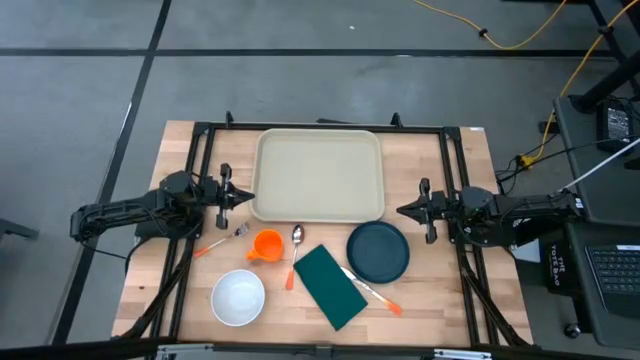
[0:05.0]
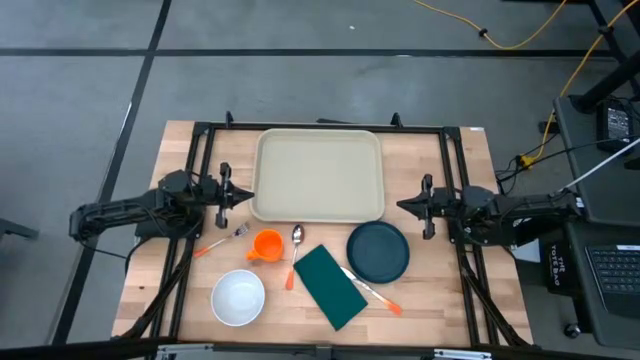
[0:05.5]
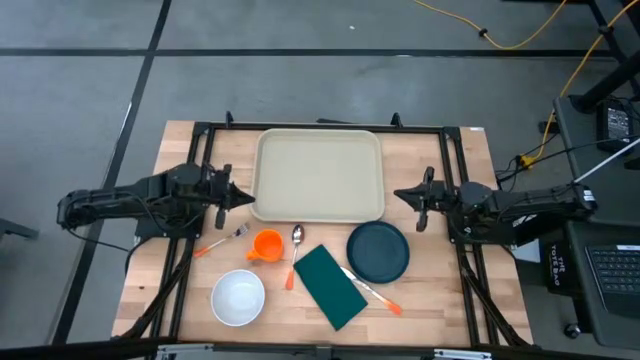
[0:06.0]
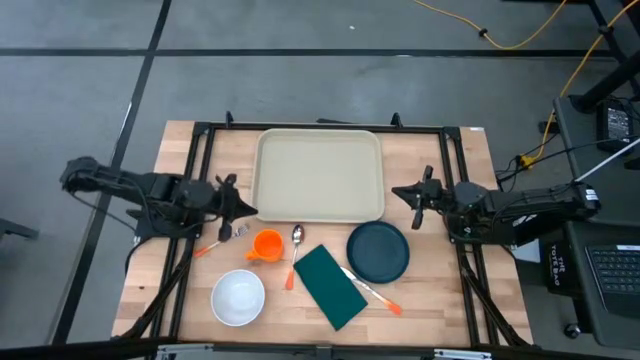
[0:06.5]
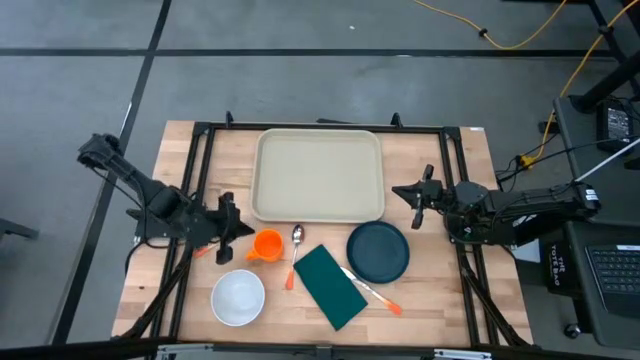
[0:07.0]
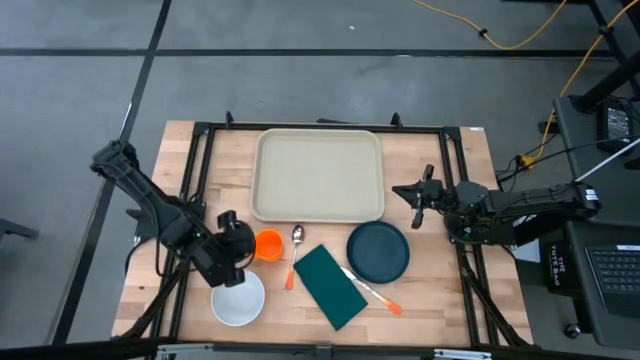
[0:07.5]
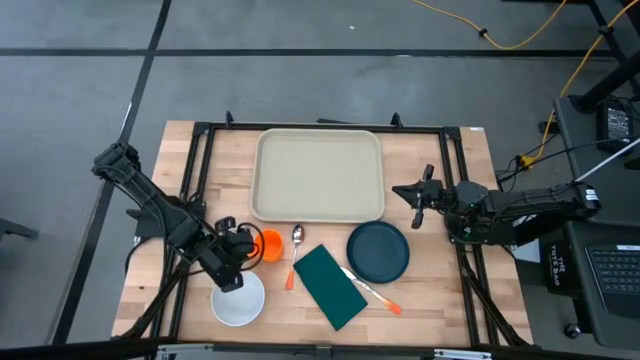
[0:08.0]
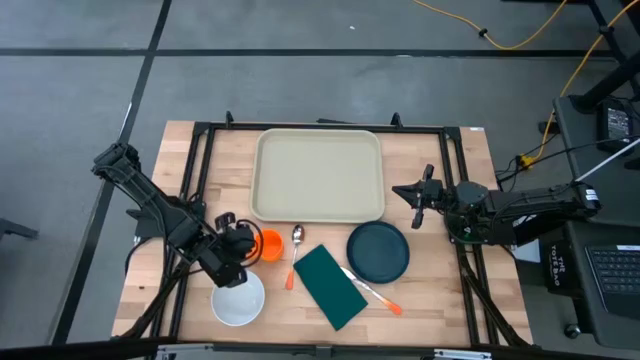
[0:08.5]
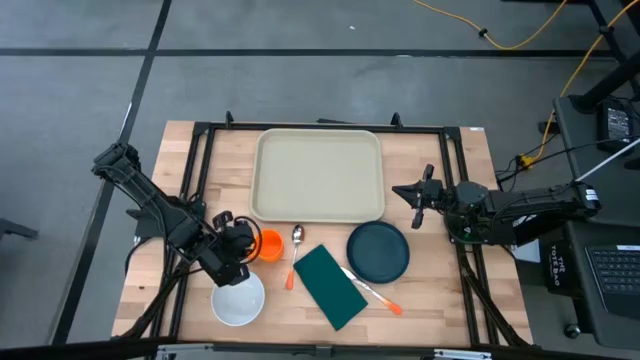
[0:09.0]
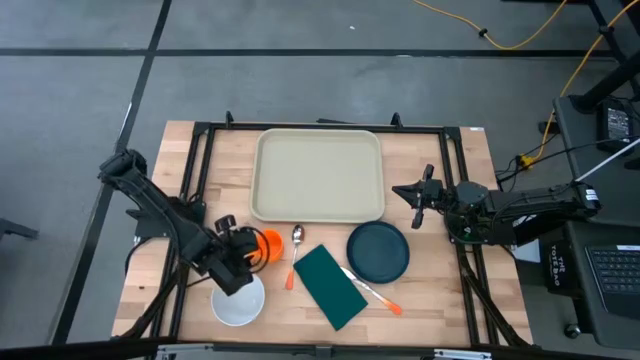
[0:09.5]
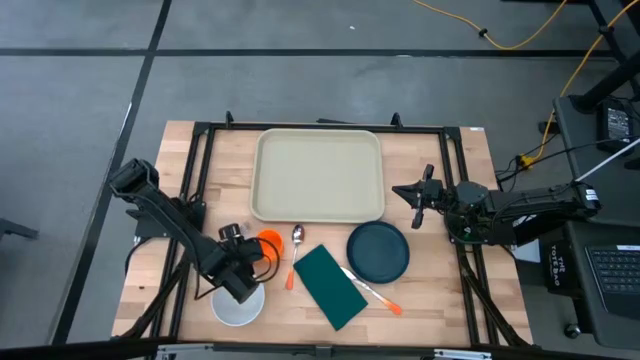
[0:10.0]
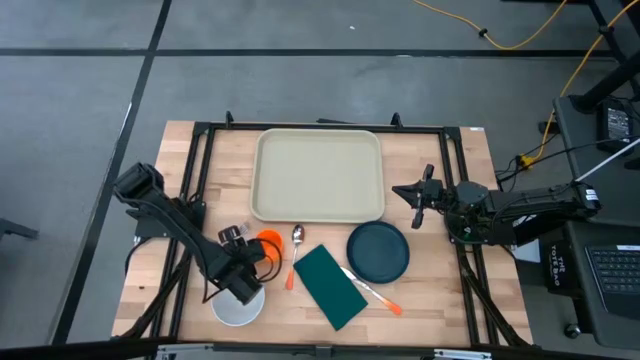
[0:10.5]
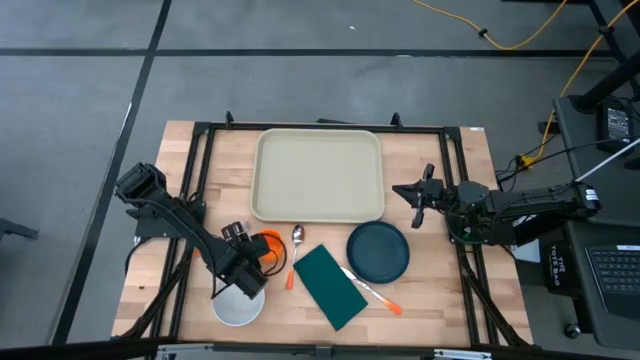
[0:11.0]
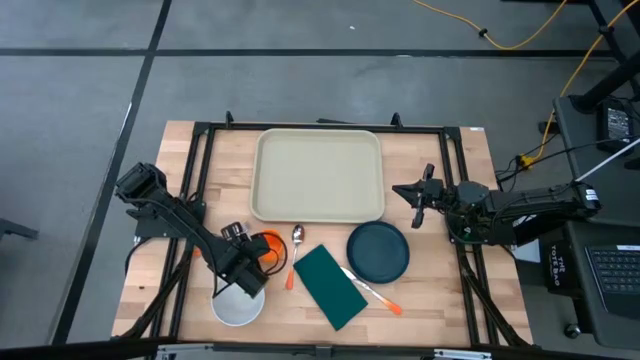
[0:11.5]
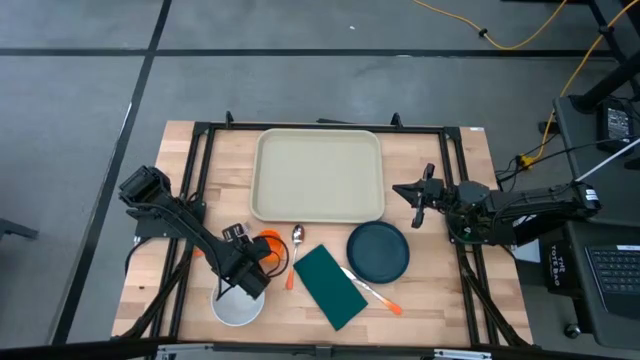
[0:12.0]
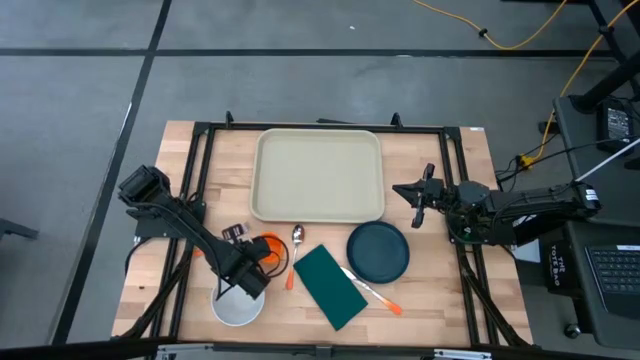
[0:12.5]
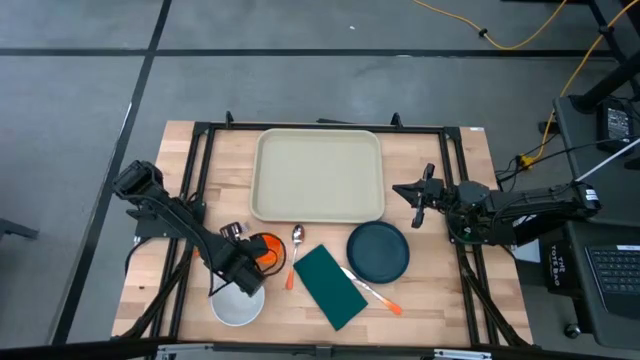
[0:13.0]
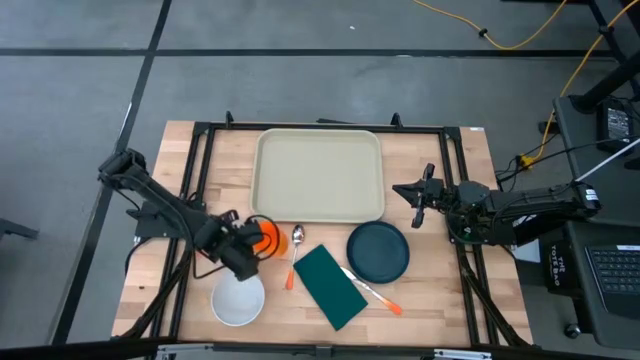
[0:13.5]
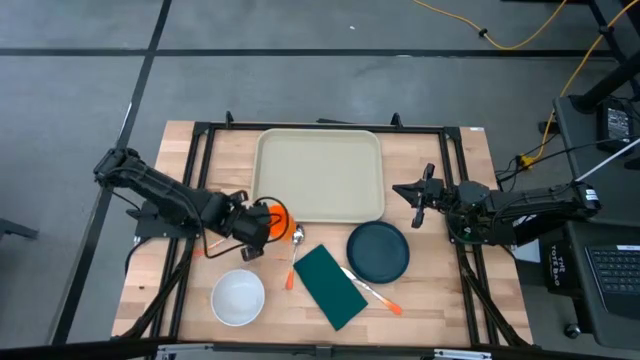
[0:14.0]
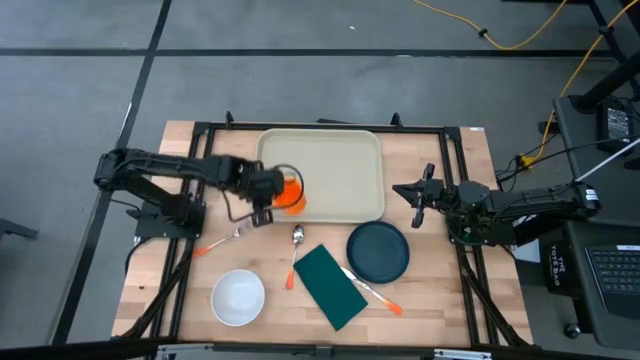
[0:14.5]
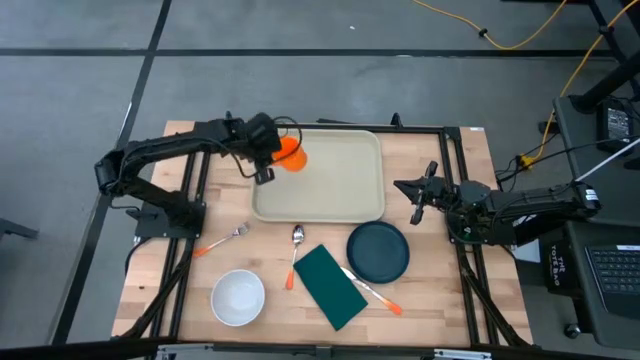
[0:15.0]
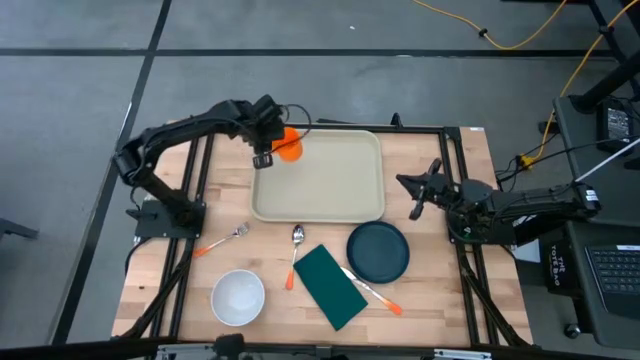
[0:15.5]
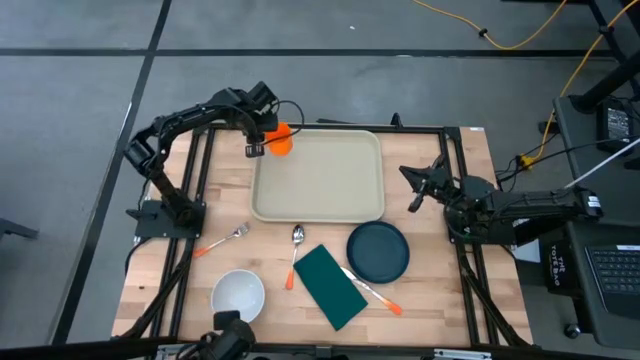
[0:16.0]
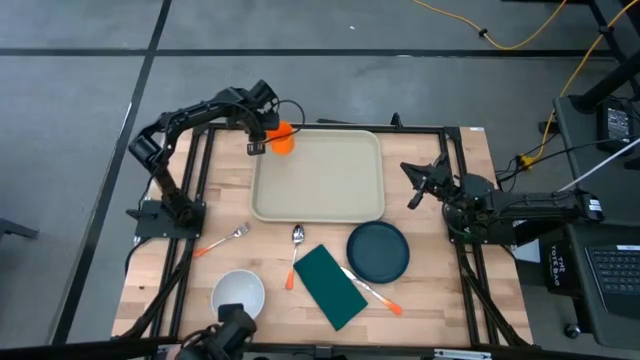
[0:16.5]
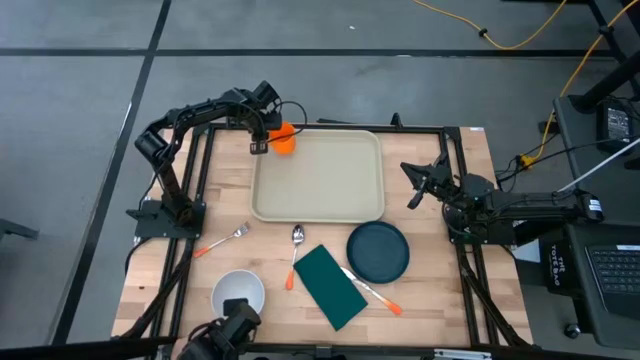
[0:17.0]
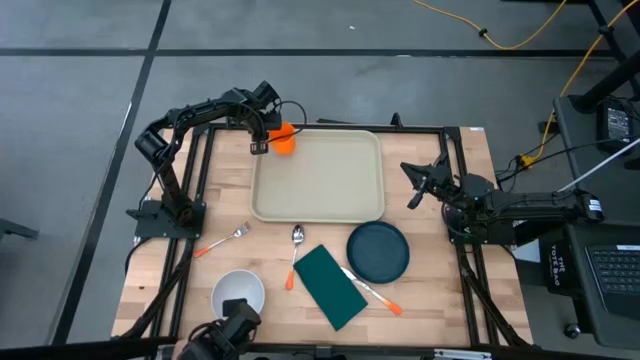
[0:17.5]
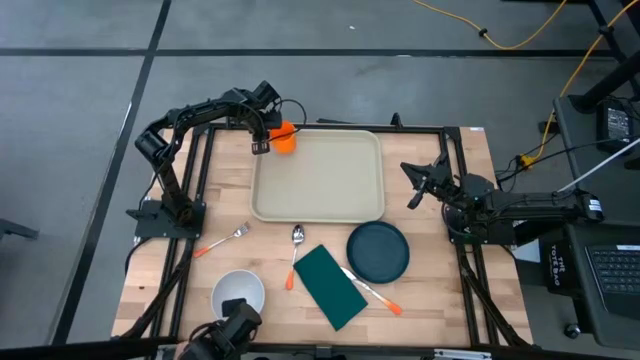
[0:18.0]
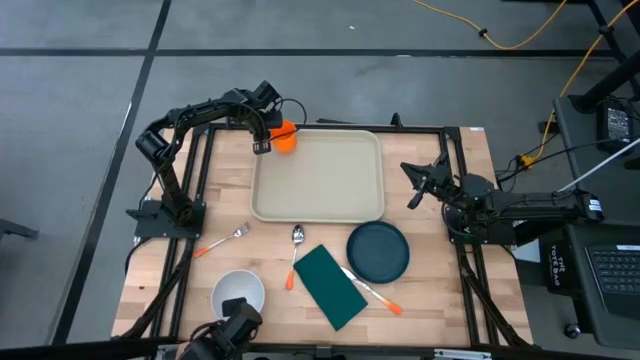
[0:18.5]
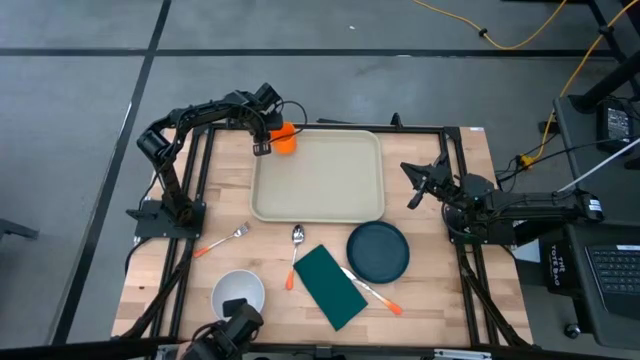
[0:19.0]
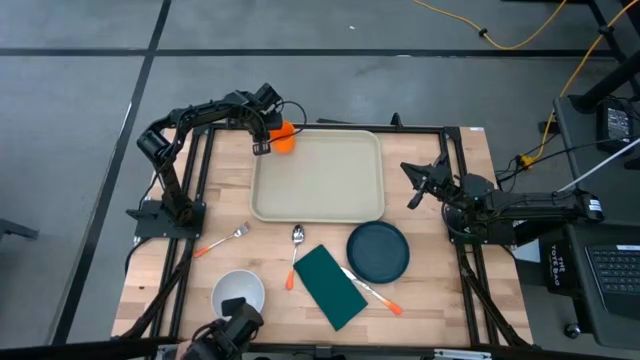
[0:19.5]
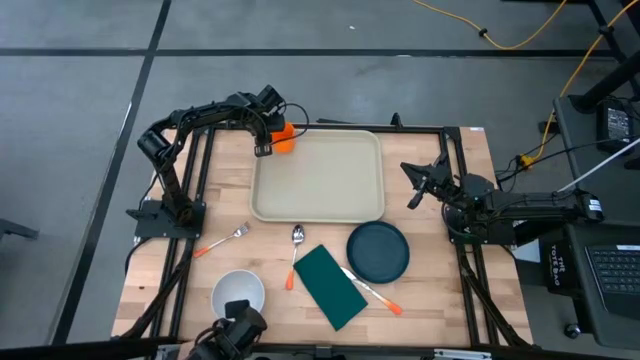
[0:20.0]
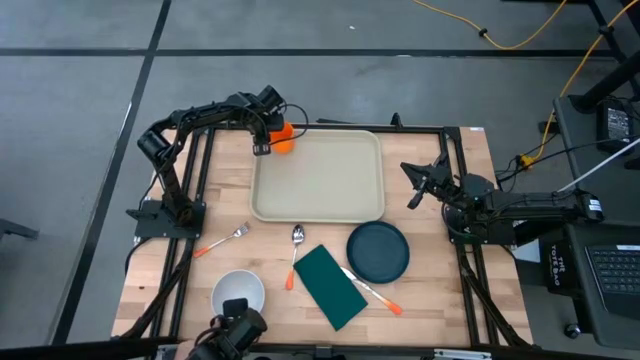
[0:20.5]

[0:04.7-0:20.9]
Task: Set up tray
Put the orange mug on the brown serving tray

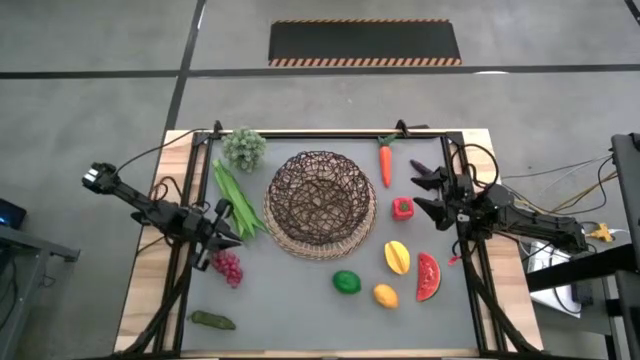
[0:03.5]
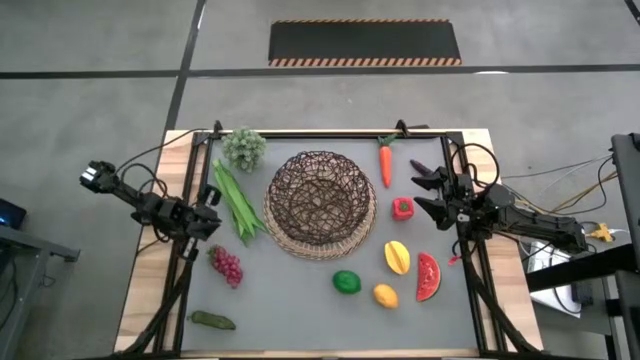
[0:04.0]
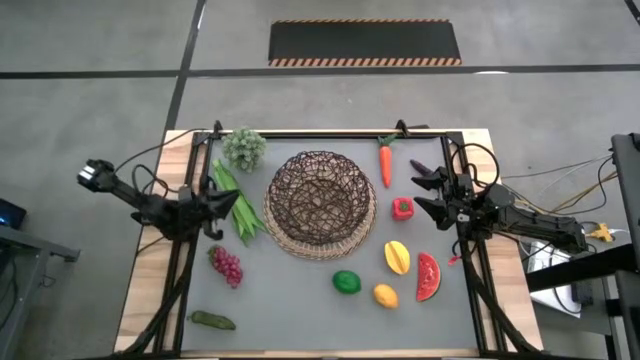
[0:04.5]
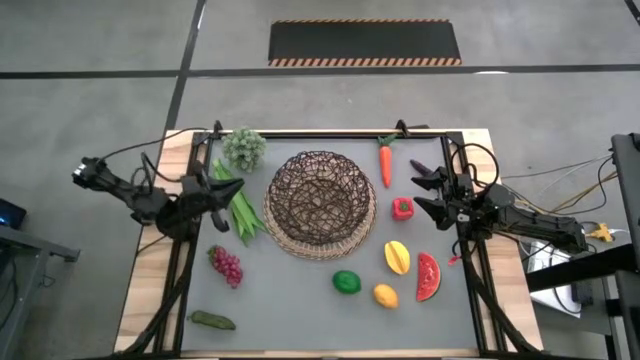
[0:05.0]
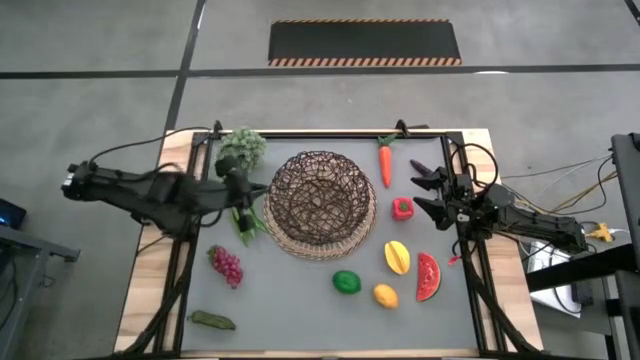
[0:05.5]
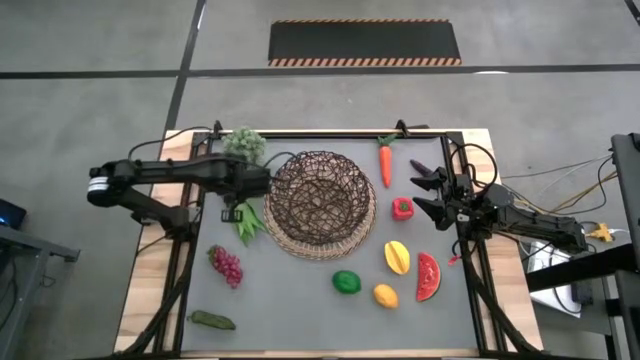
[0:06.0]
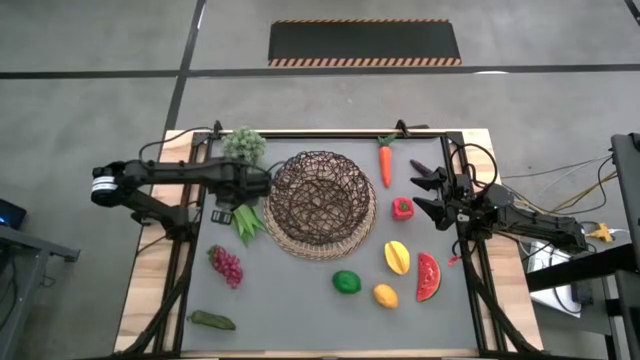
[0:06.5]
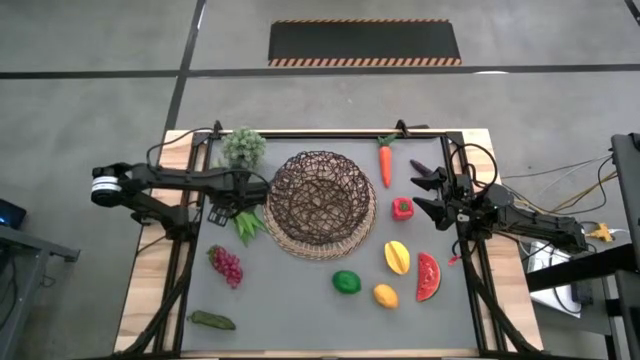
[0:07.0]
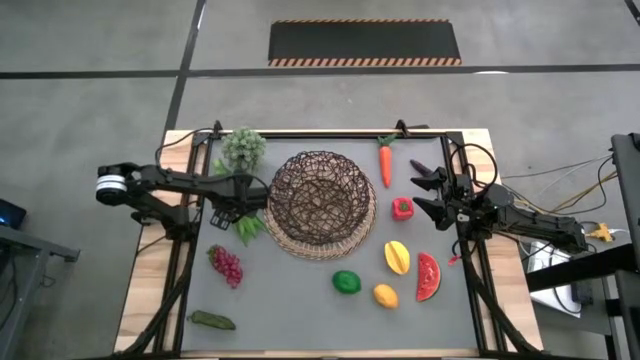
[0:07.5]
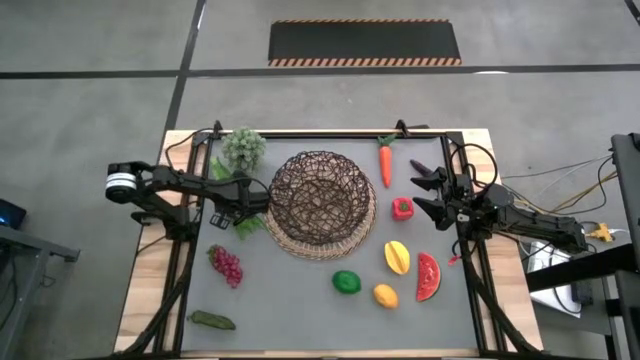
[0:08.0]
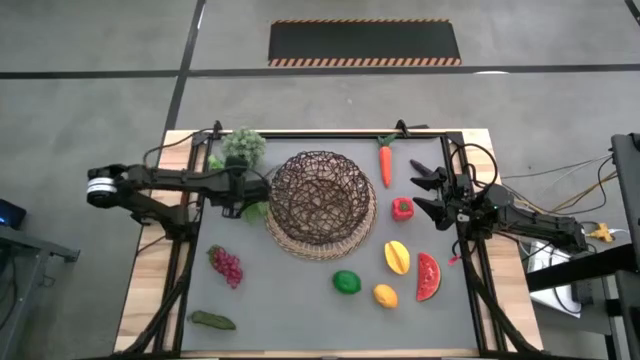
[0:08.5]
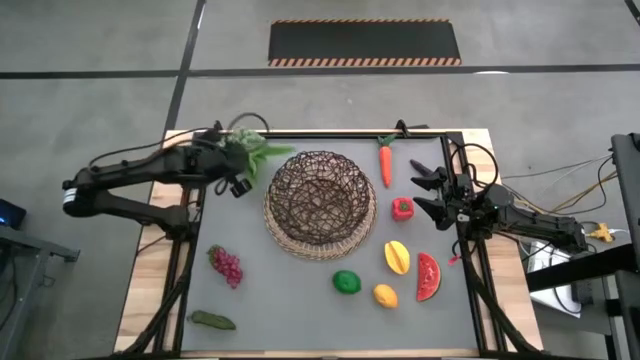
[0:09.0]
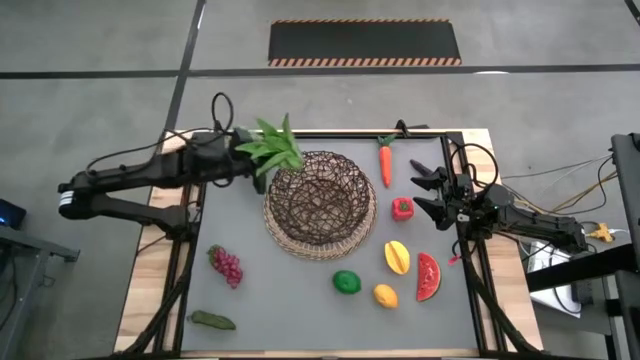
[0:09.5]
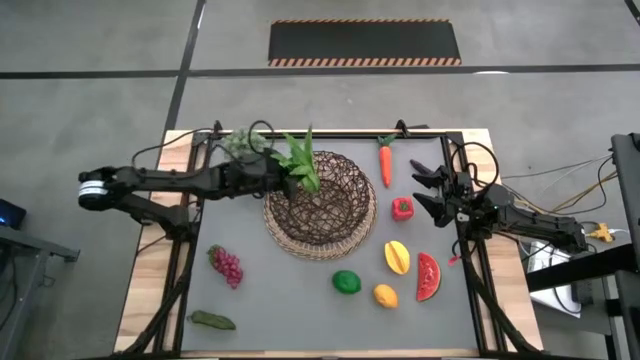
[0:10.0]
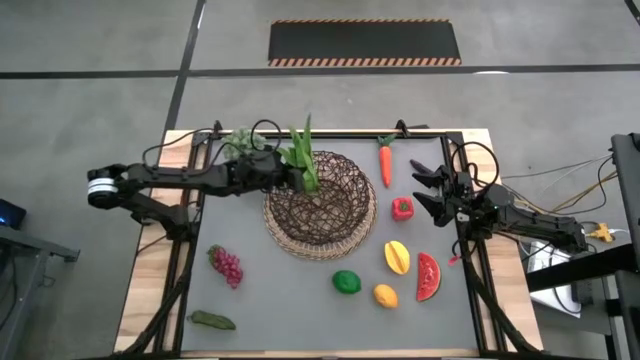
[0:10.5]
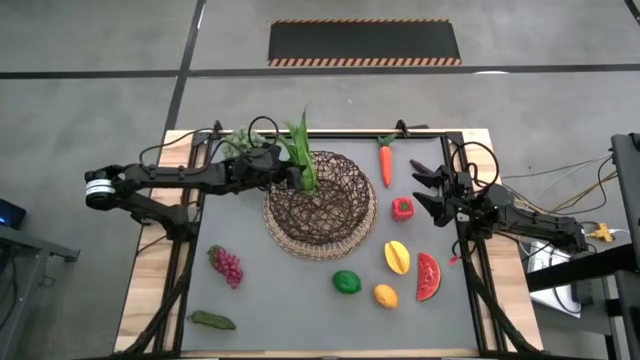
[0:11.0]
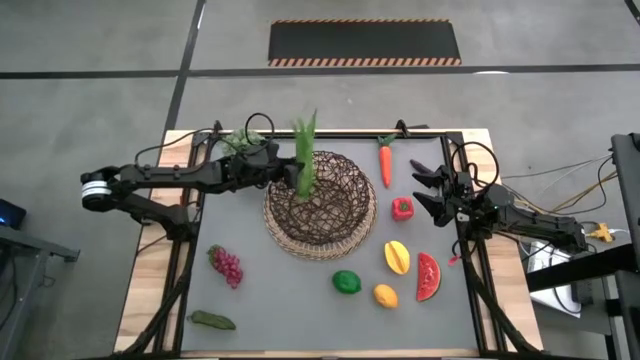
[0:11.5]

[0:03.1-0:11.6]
Task: Build produce basket
Put the green leaf lettuce into the basket
